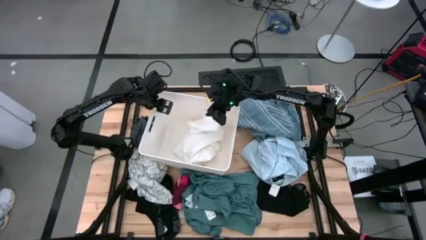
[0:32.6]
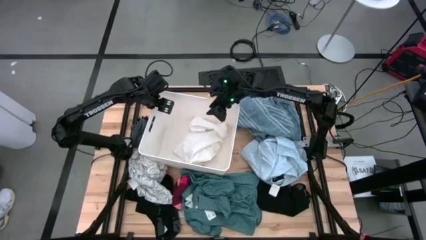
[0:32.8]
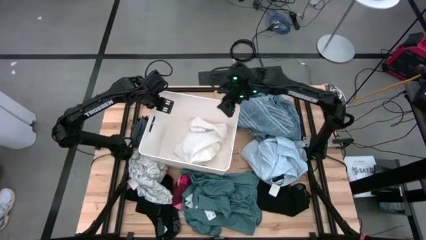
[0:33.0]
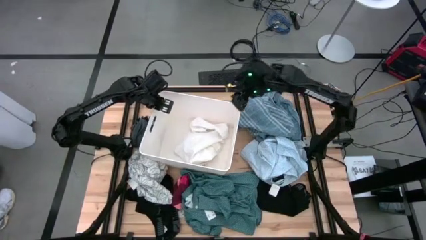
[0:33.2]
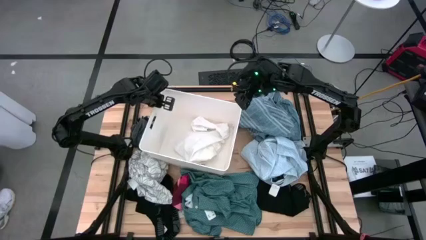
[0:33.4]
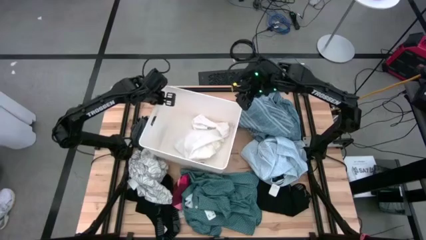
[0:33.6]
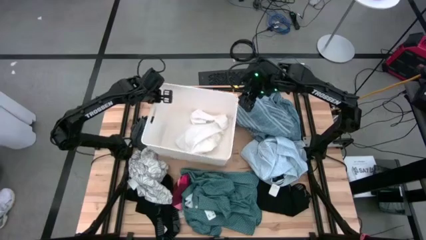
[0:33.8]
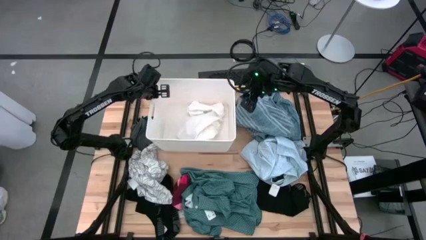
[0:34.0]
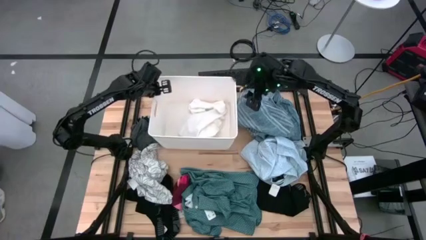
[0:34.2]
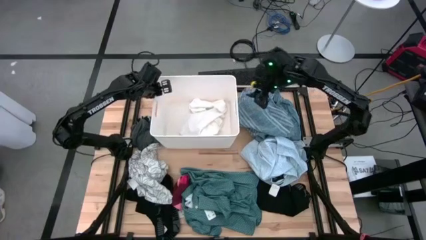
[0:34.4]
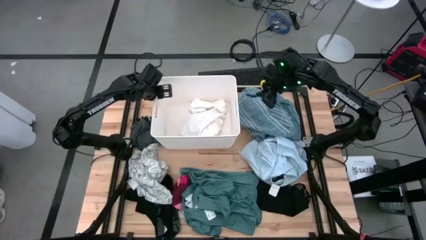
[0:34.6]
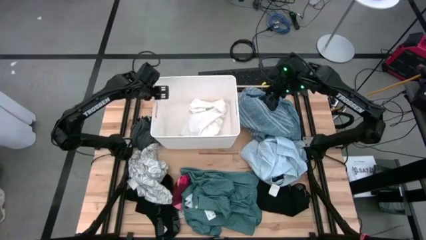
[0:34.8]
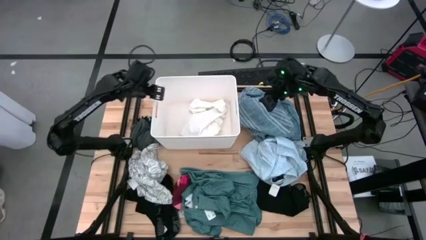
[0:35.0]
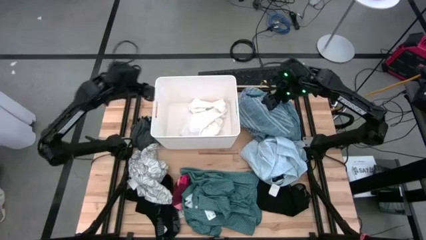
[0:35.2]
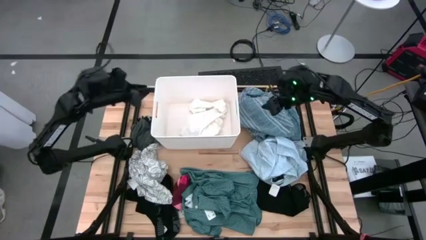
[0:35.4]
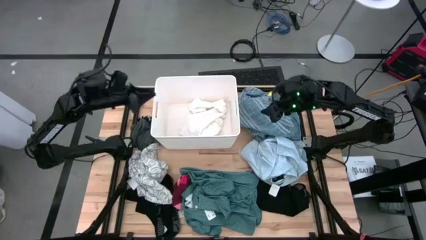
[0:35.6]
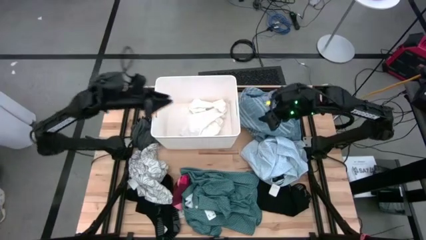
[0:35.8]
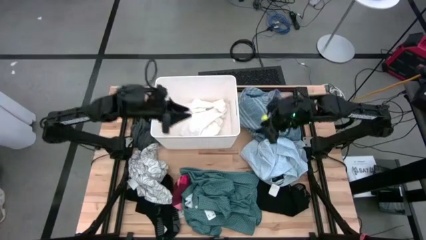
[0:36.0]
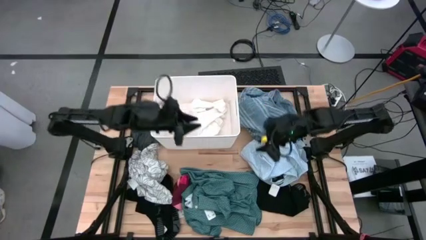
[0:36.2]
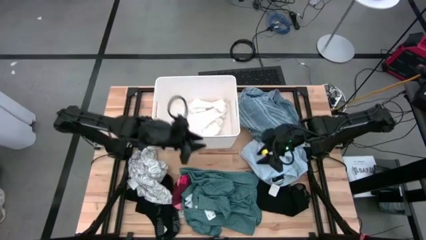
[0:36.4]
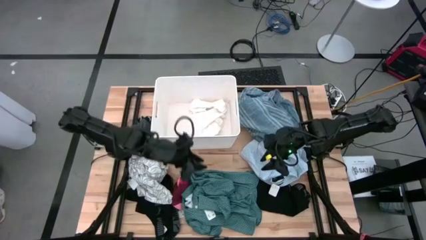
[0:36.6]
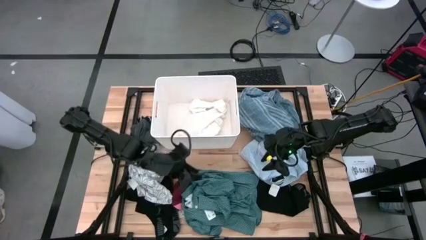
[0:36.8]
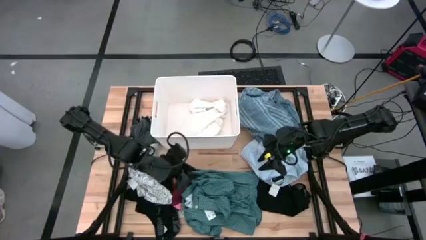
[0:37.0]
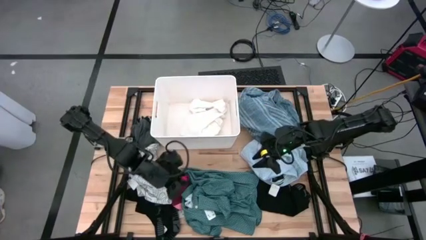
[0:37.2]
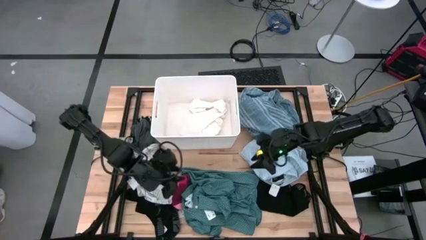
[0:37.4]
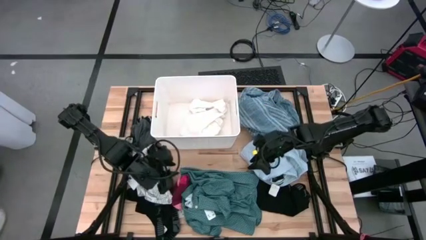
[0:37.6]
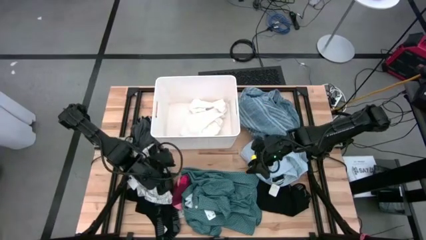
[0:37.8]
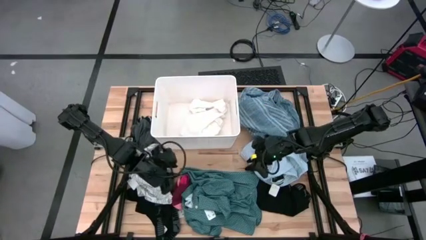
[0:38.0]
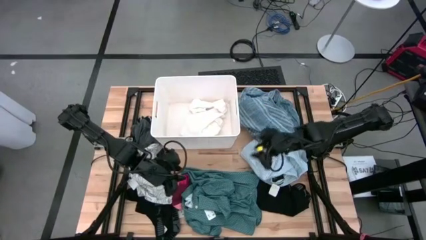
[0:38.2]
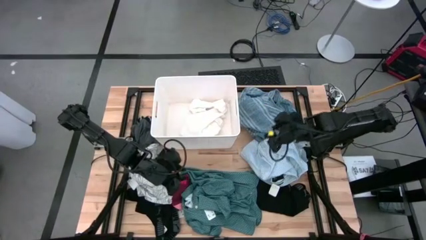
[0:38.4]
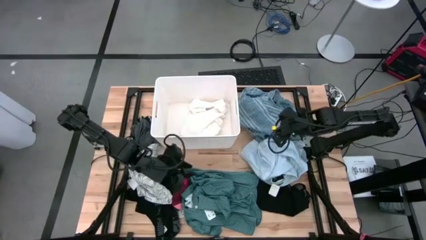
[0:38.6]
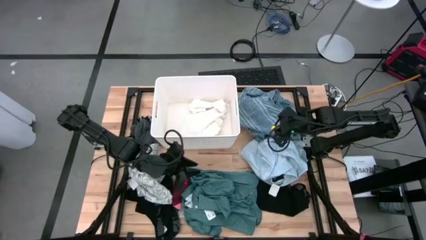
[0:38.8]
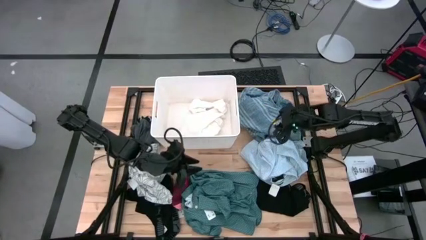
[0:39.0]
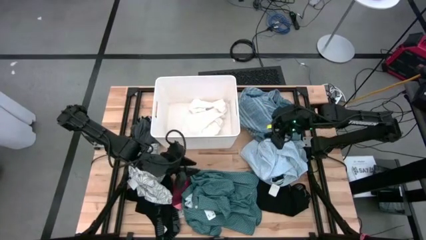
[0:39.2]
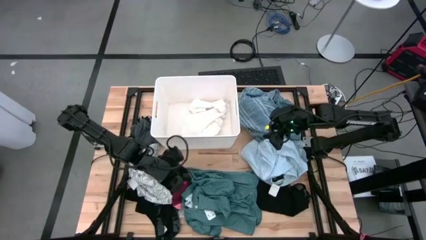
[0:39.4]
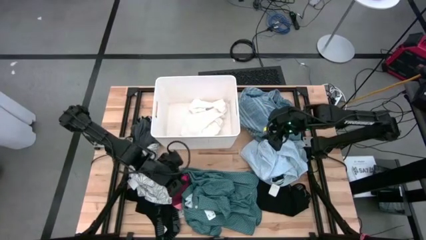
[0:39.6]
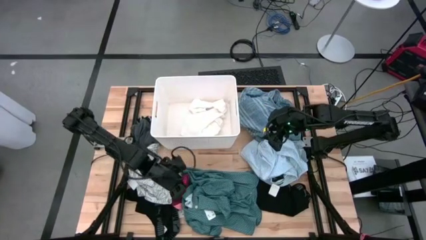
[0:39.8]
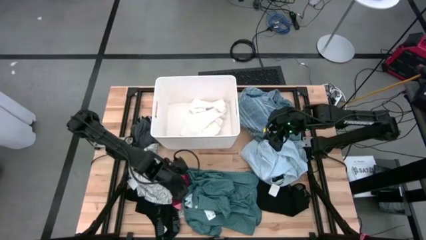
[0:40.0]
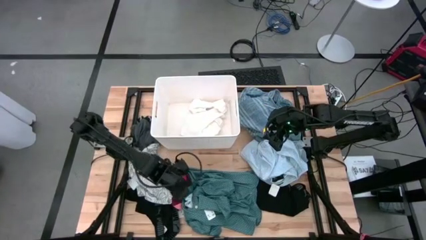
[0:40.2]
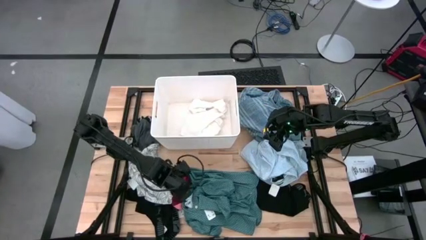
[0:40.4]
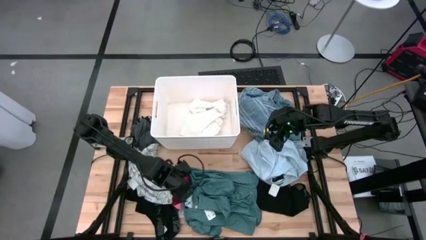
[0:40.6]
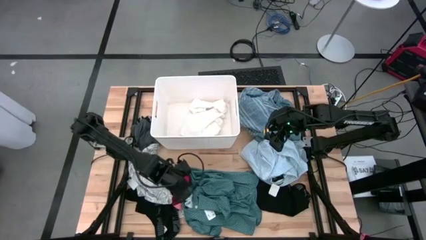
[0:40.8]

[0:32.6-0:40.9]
Task: Sort clothes
Put the red sock into the white laundry organizer

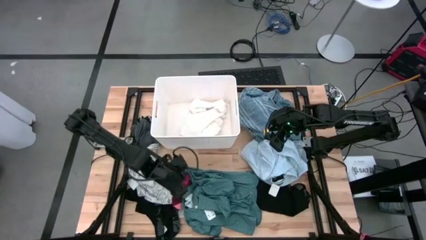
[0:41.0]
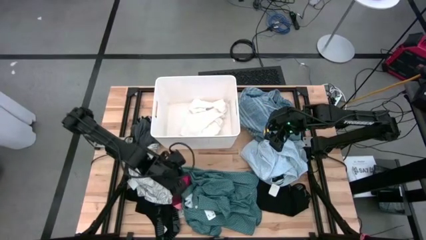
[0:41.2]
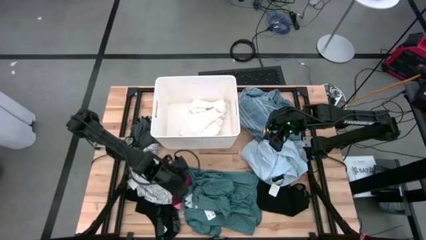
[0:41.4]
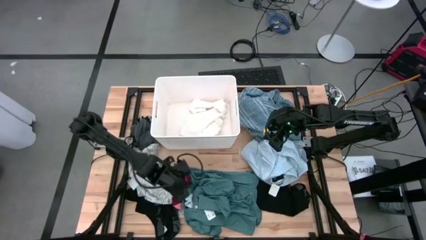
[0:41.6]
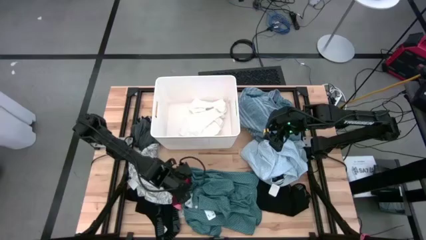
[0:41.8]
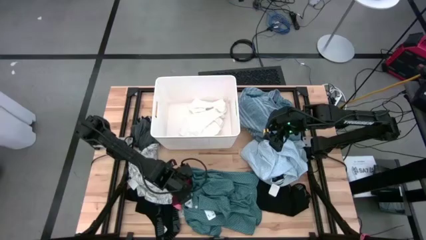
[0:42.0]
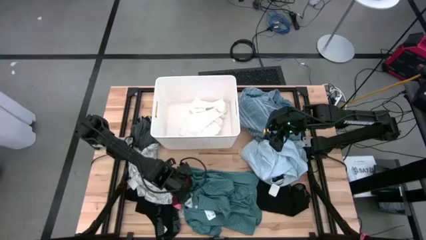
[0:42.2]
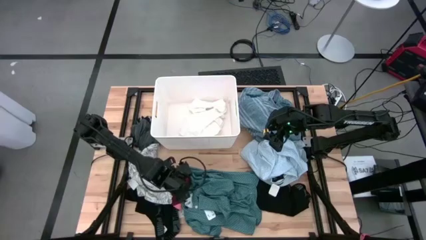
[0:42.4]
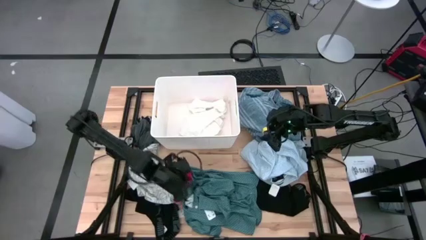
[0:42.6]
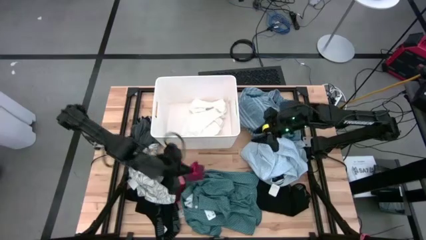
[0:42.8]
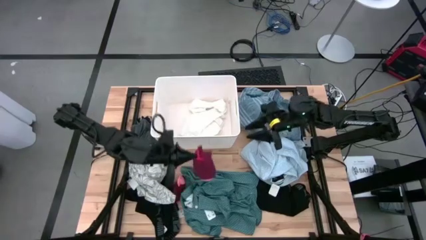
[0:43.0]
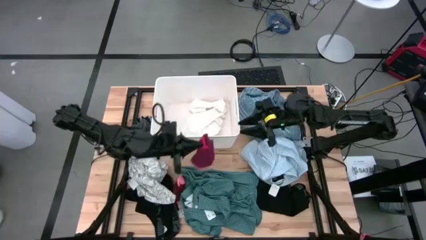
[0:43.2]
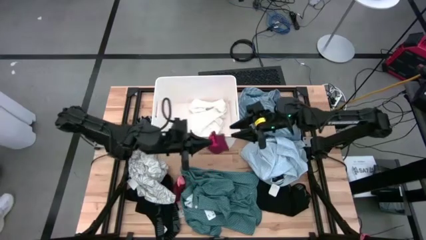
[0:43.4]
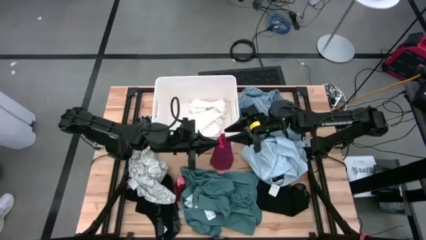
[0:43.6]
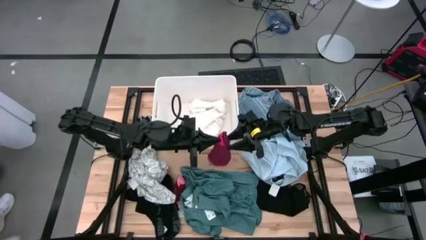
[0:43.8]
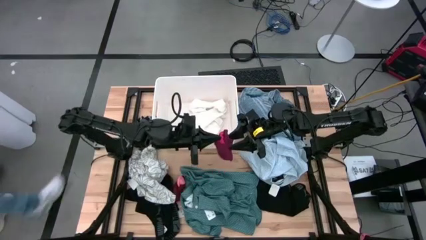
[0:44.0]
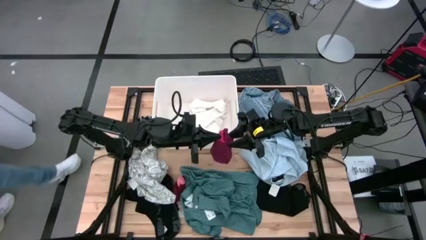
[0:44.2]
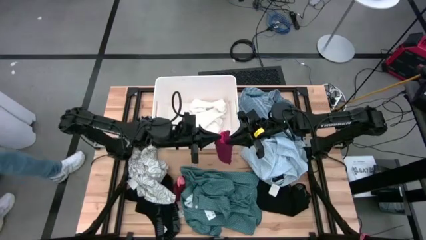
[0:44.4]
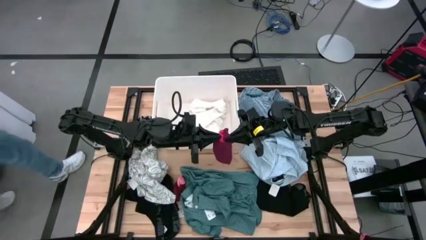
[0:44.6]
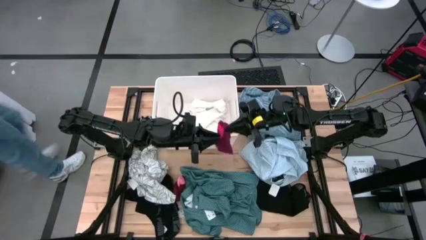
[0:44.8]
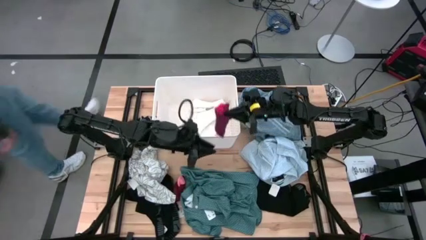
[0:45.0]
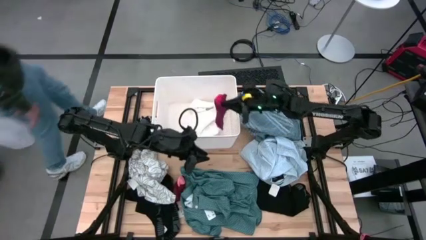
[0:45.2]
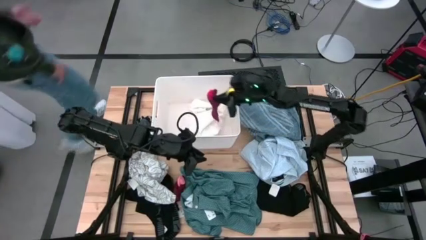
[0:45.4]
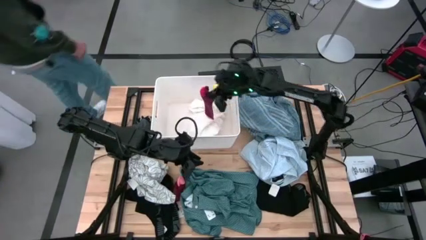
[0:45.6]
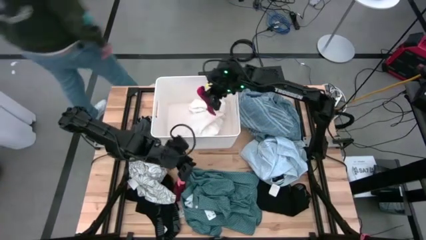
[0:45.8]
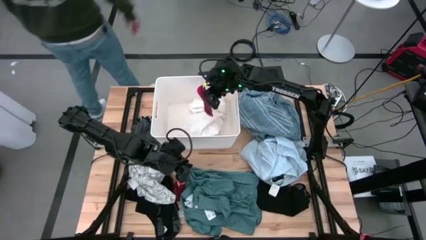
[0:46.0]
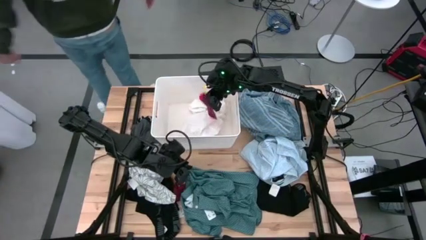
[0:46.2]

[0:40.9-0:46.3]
Put the red sock into the white laundry organizer

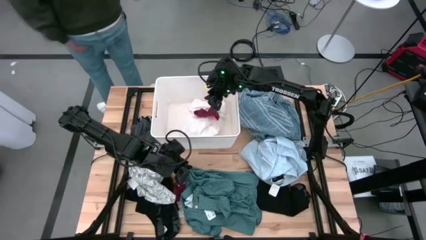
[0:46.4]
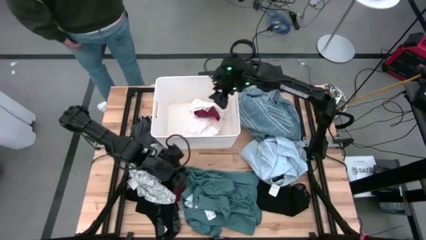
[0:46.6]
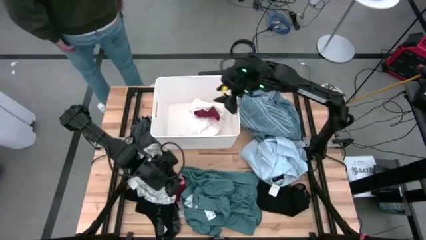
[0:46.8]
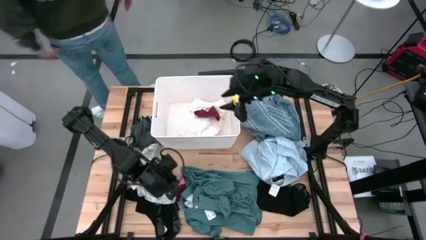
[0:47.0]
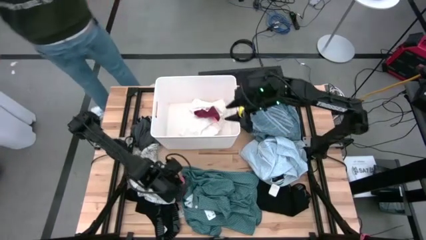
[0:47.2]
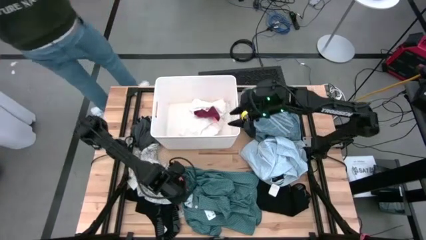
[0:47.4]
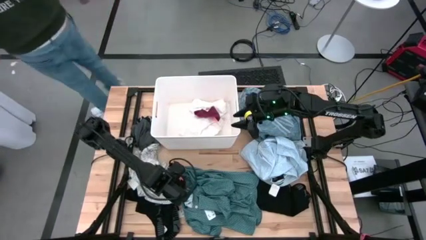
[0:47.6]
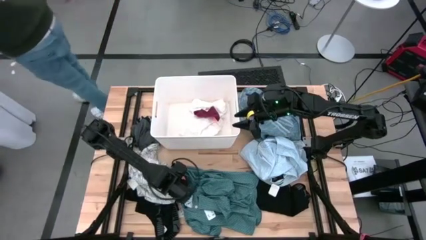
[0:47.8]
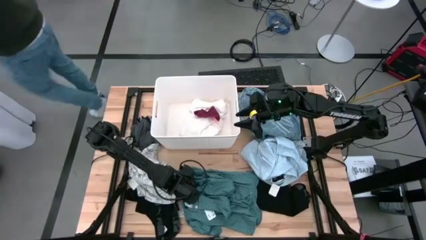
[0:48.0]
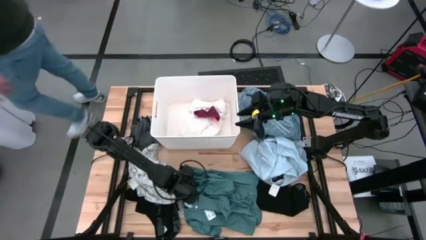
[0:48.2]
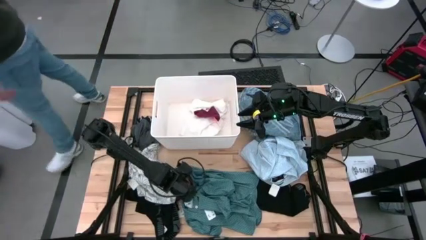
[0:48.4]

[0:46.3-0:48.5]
Put the red sock into the white laundry organizer

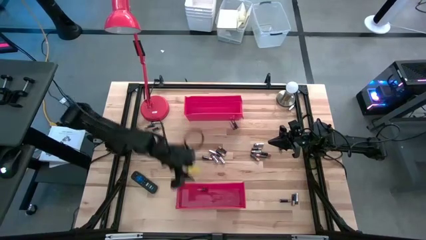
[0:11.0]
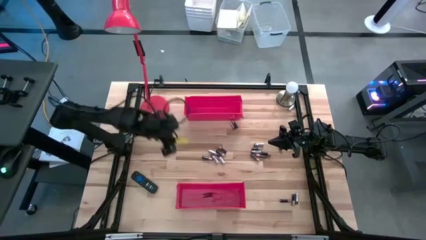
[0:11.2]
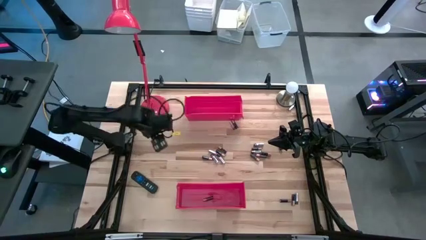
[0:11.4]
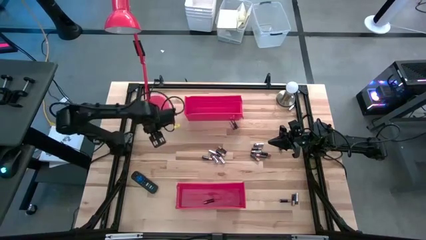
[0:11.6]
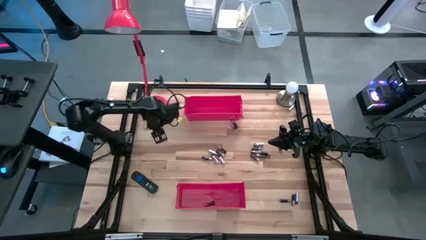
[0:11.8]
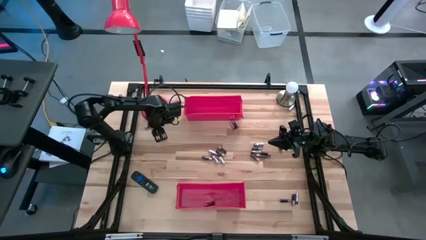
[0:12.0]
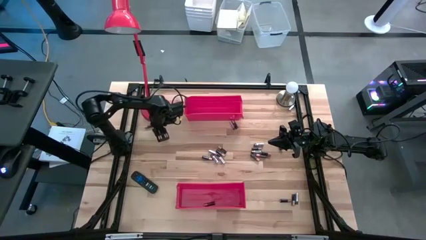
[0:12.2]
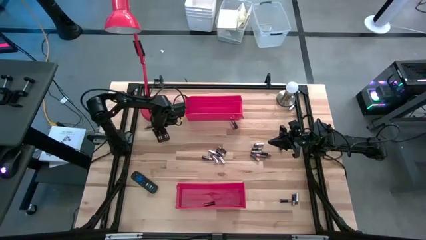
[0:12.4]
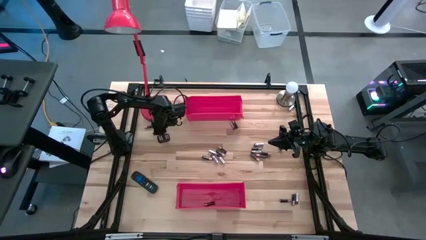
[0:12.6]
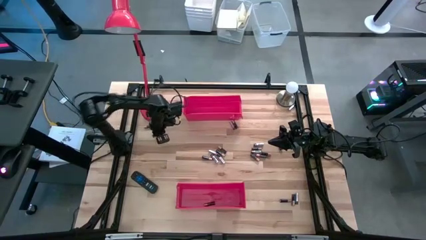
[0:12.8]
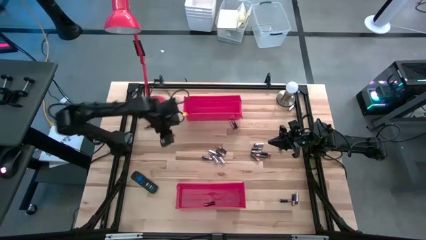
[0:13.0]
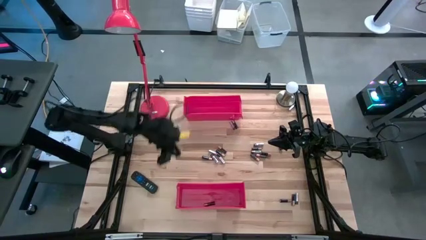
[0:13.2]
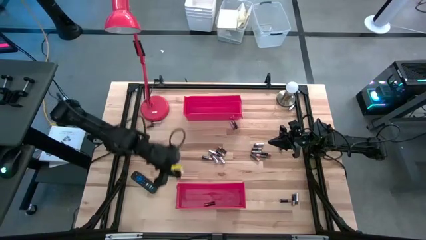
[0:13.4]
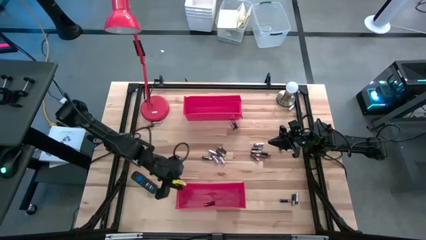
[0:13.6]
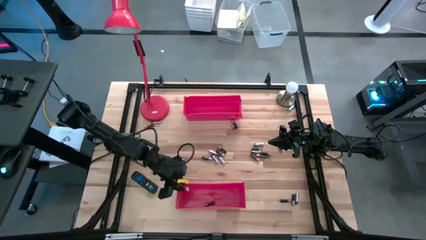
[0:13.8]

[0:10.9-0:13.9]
Task: Sort batteries
Put the brown battery into the bottom red bin
